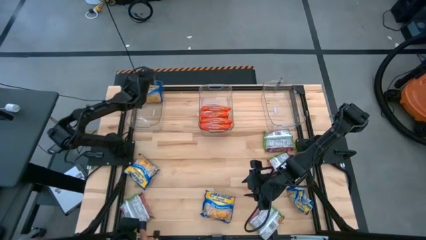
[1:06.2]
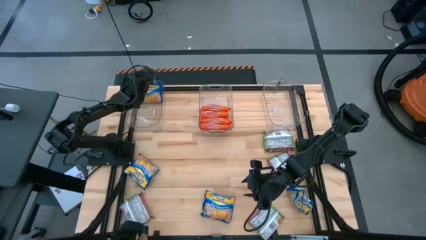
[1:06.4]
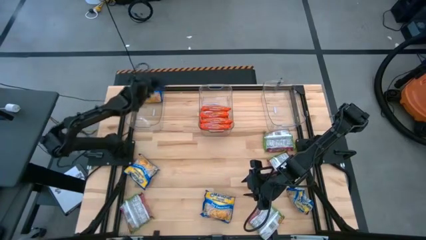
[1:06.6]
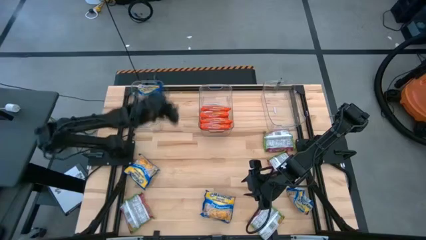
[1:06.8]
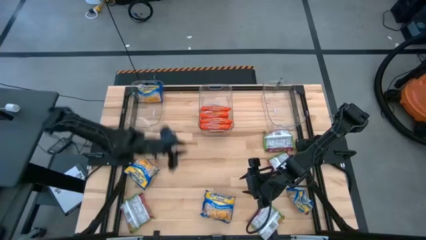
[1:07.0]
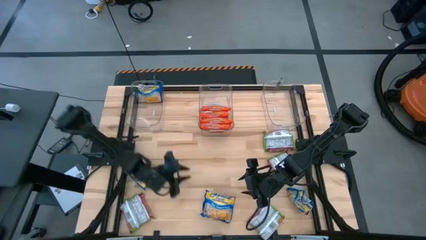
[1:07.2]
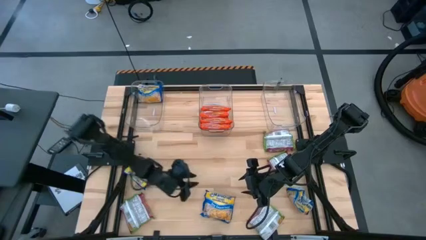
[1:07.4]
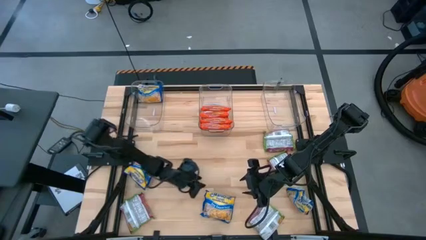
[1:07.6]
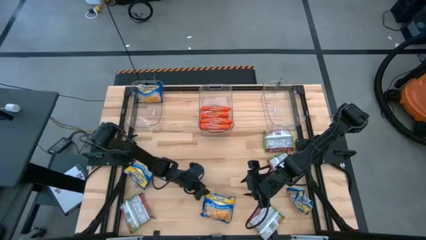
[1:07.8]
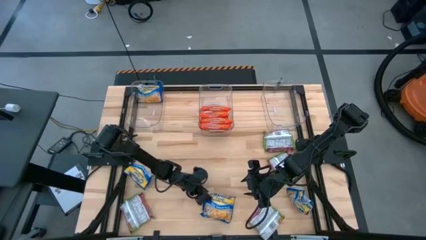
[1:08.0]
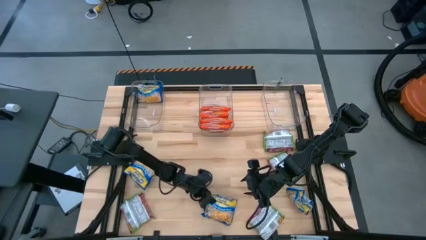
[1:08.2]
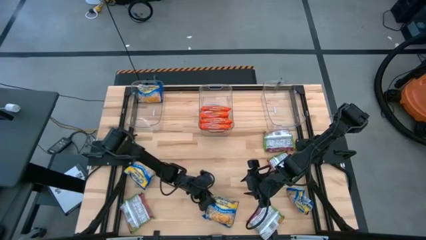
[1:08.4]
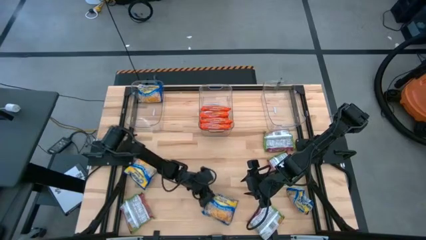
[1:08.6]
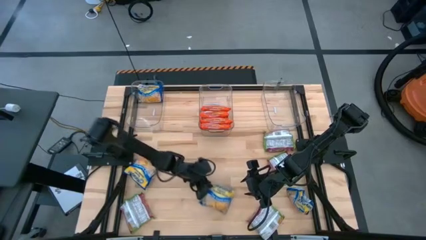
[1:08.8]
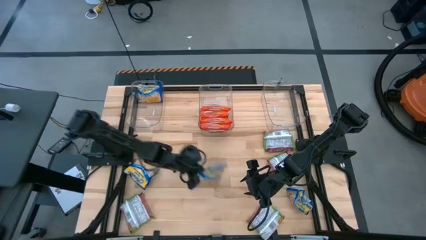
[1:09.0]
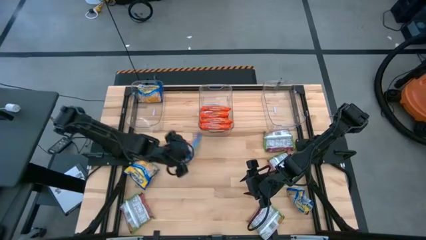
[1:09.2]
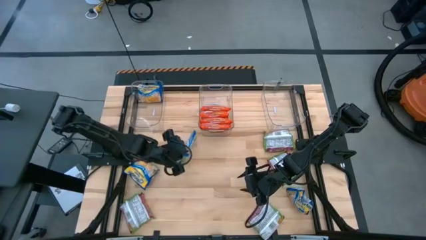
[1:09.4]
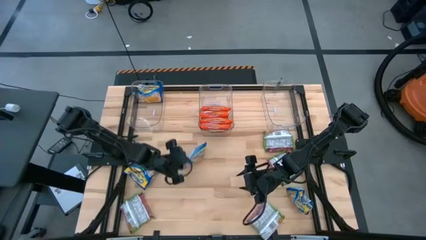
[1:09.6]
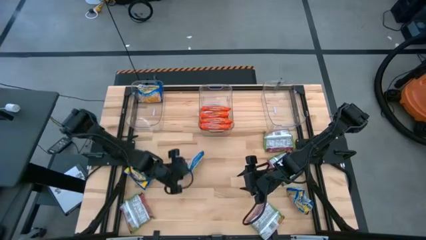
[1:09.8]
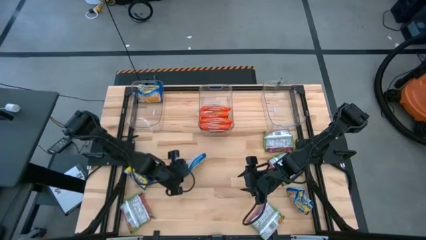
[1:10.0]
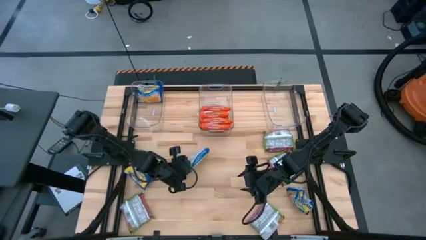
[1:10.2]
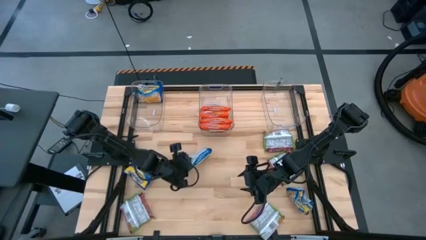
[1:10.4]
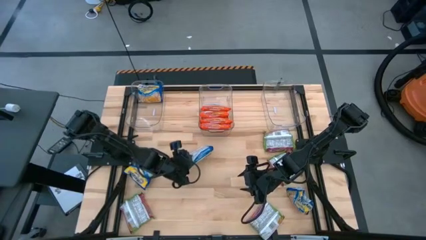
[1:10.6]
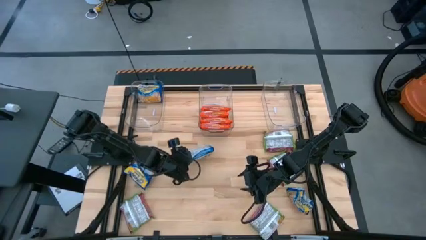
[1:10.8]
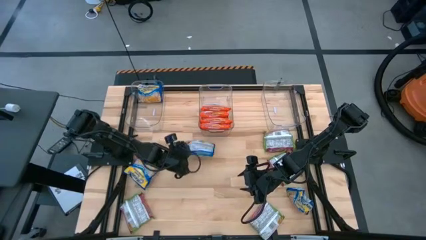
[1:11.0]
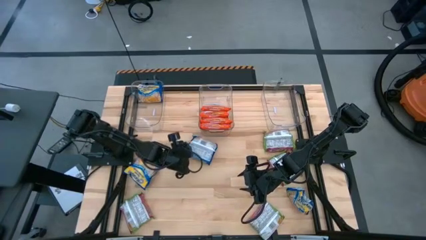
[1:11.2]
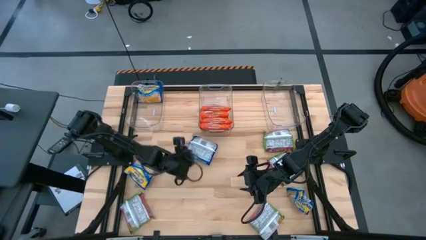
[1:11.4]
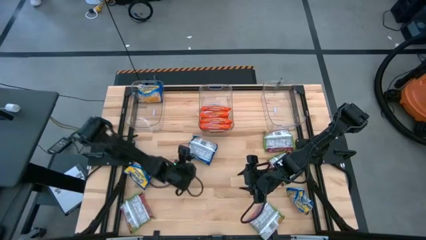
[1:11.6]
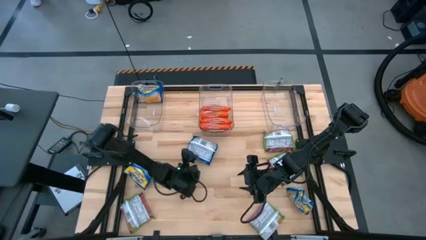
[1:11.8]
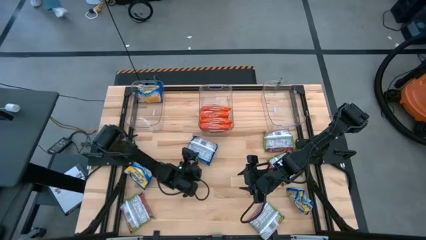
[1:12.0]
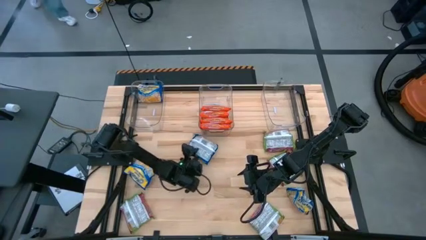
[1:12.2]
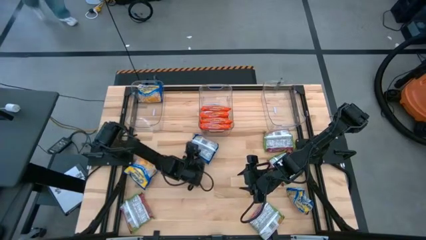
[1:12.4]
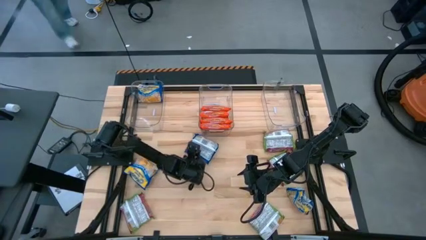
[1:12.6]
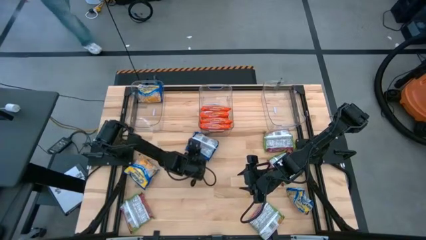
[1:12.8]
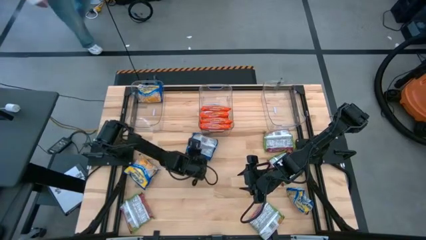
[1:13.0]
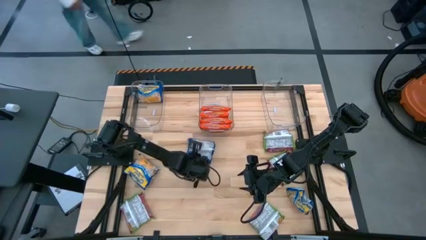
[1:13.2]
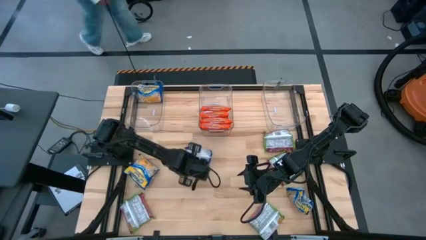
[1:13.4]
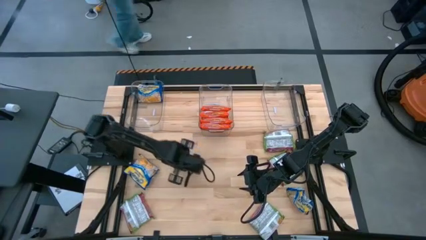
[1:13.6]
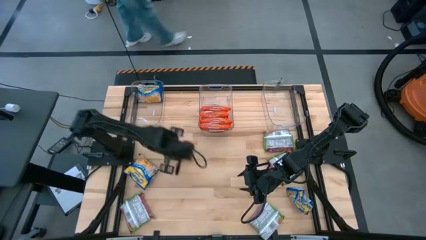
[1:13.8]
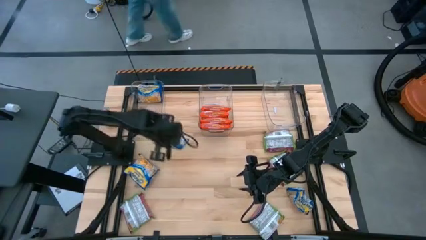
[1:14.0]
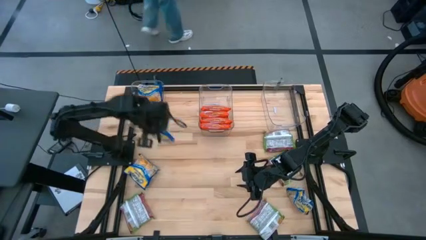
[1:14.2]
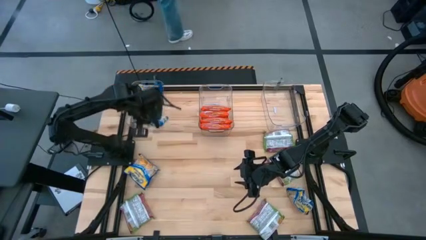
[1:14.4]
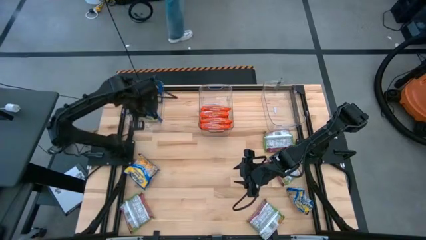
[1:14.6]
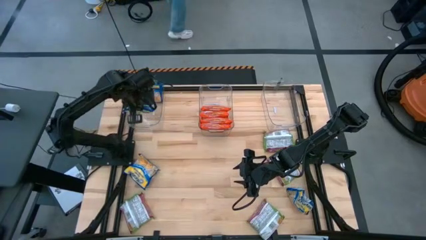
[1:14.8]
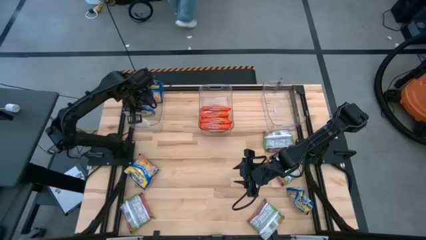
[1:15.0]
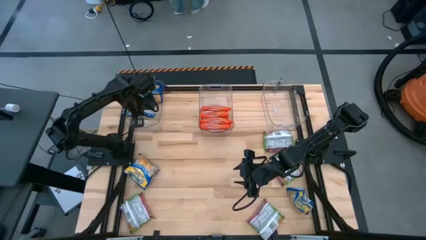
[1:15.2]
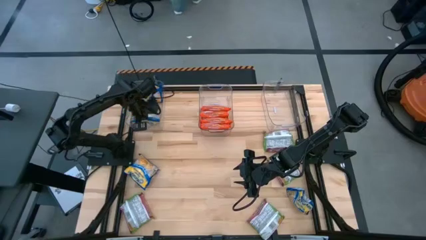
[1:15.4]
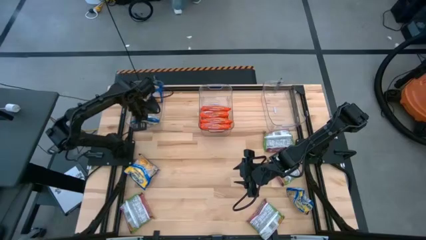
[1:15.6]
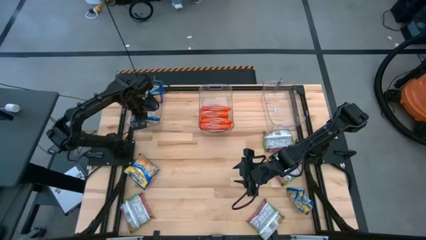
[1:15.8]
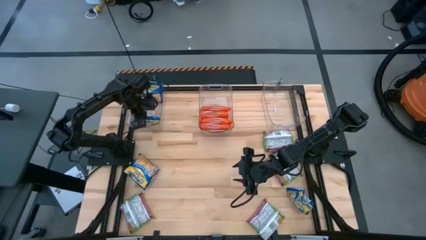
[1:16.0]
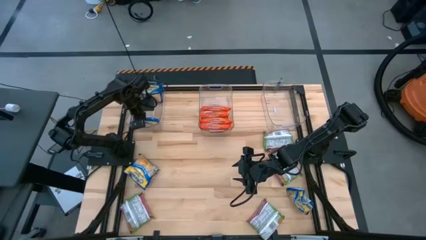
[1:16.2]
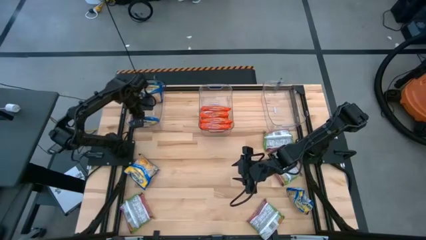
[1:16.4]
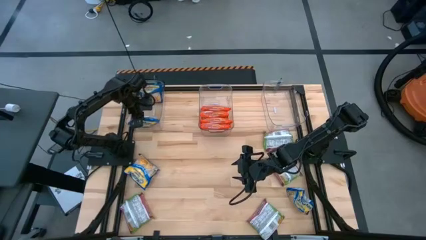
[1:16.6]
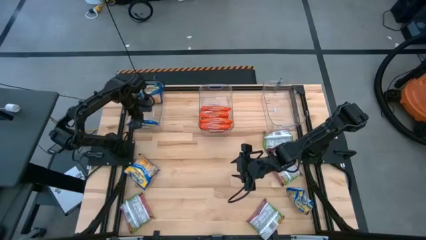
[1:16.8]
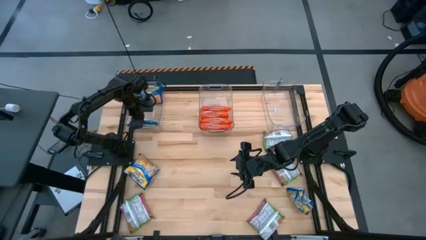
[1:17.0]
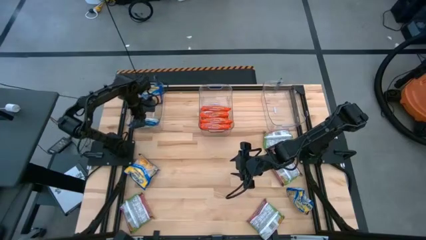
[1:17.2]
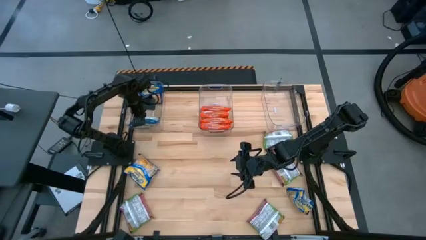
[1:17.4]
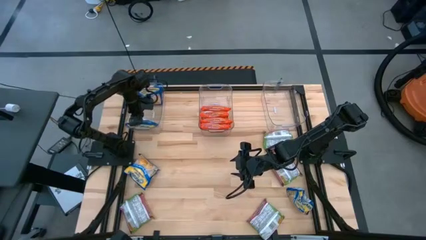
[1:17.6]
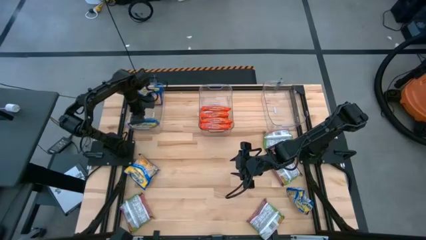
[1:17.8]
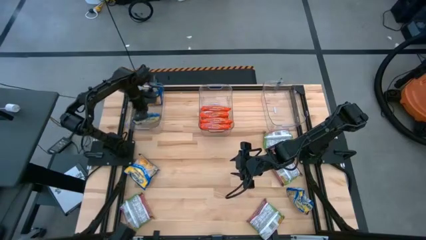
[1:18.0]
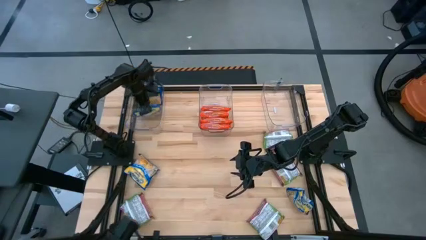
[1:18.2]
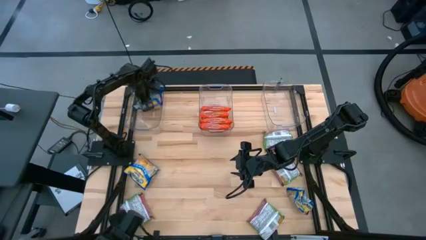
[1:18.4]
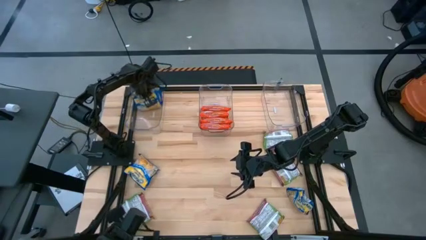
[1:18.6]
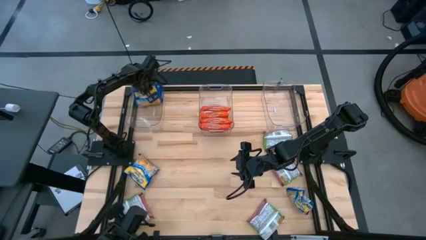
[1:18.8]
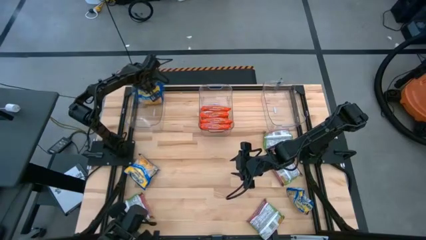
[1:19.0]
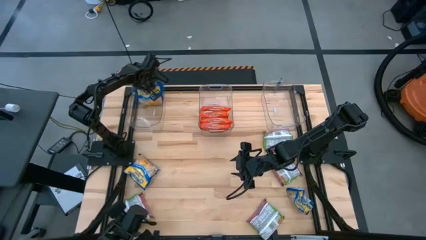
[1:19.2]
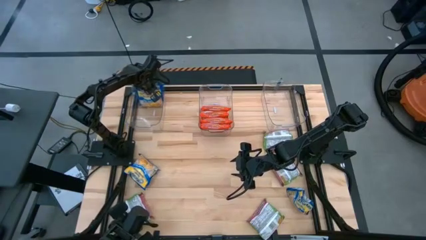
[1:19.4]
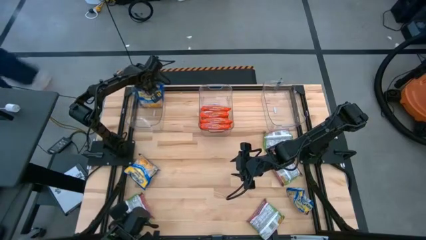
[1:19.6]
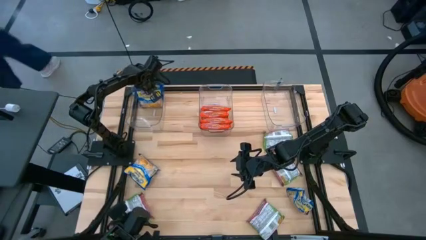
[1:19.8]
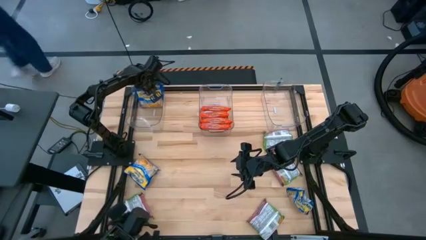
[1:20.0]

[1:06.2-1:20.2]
Task: Sort Maruchan noodles
Put the blue noodle pack into the left transparent bin

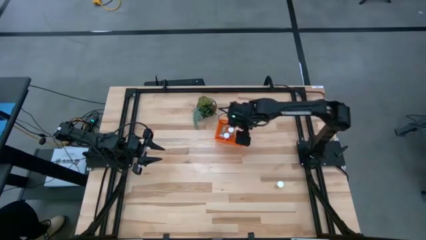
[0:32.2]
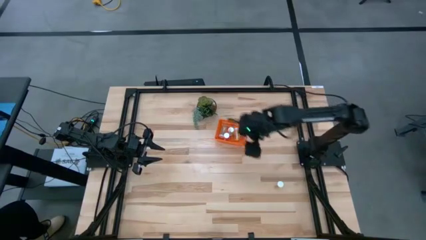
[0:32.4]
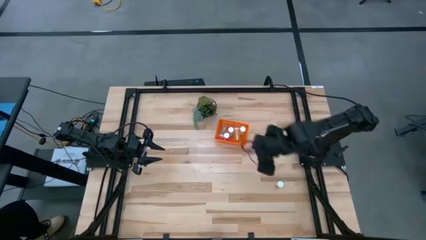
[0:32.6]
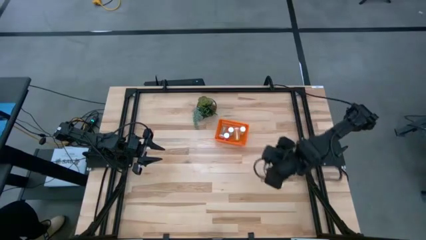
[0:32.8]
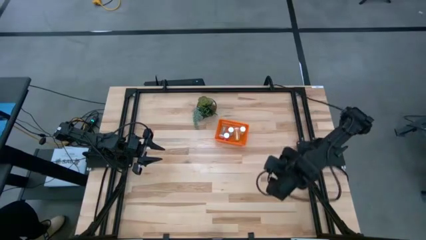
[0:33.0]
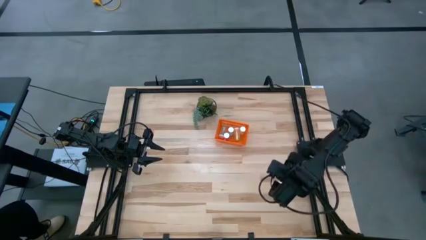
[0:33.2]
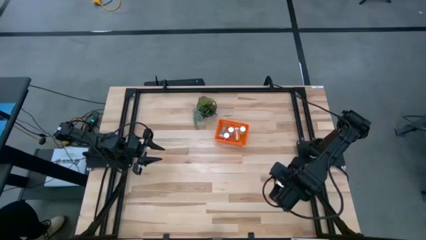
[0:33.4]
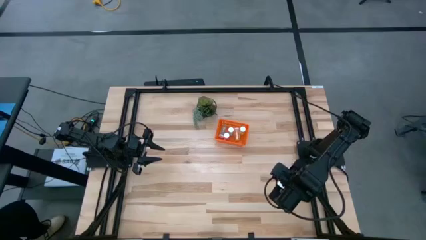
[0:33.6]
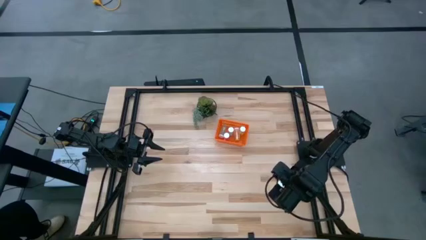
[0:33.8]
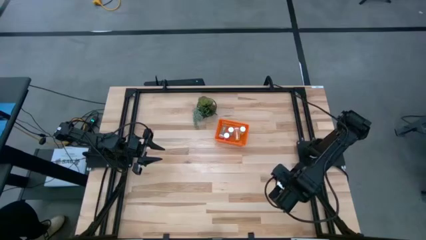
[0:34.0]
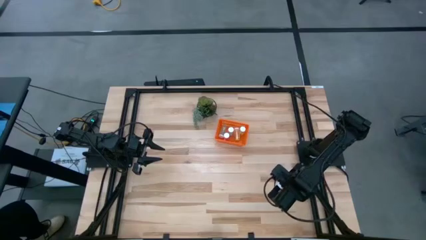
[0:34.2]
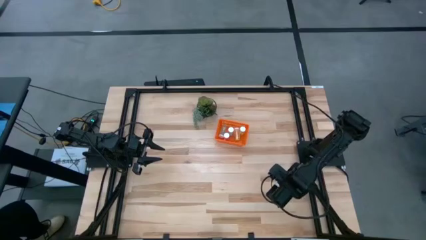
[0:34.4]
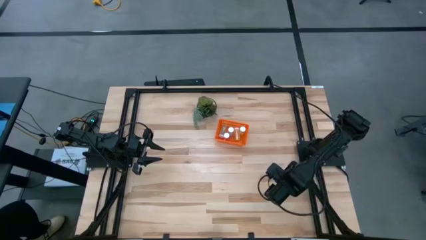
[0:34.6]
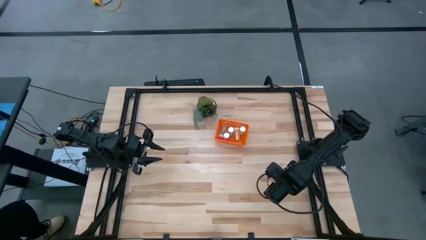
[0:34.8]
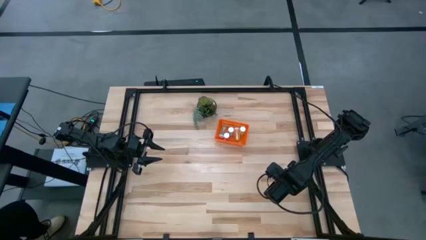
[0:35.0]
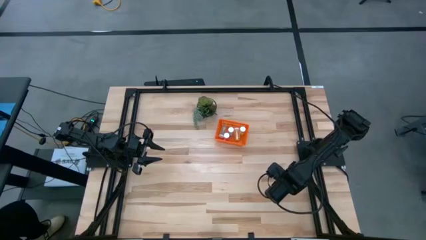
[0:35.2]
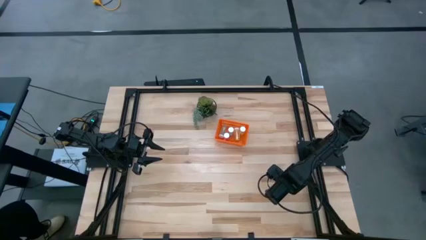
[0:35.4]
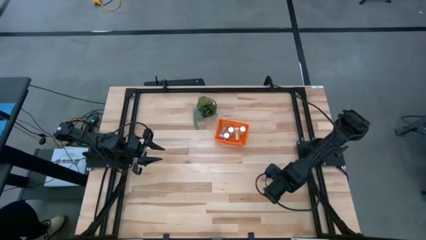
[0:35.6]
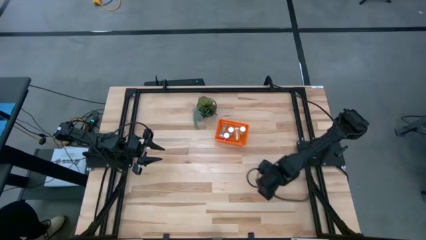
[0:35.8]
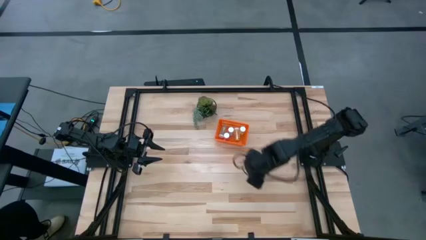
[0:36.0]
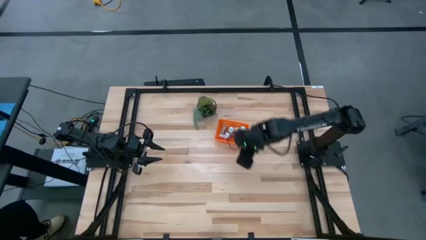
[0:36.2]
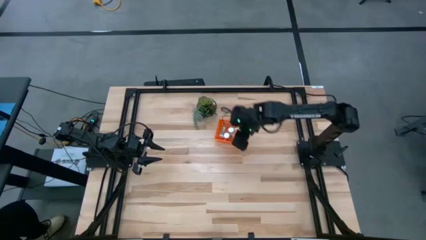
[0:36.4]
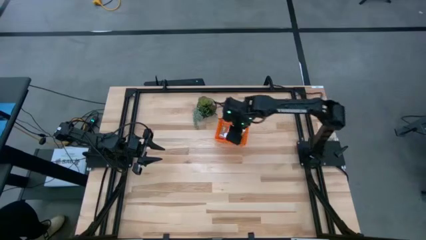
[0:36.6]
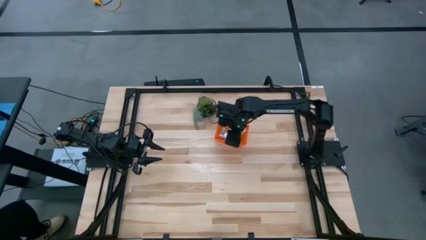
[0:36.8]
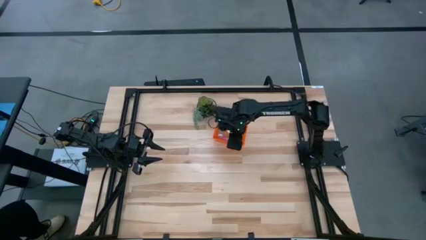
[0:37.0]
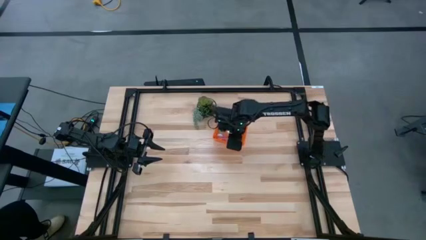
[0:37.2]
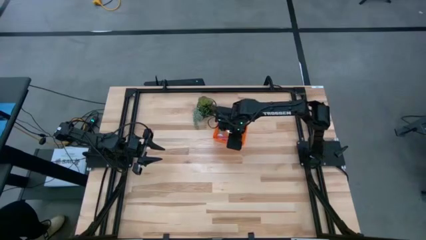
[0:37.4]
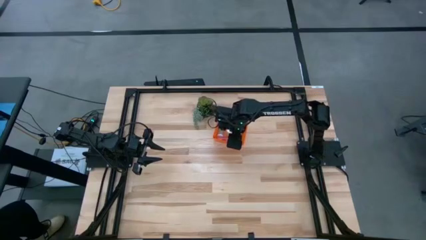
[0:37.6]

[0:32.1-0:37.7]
Task: Pick and place pill bottles into a basket
Put the yellow pill bottle into the orange basket
